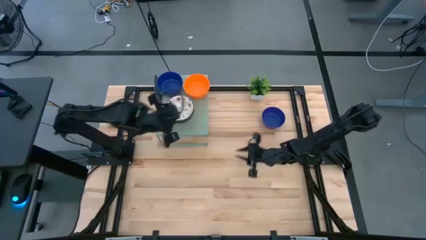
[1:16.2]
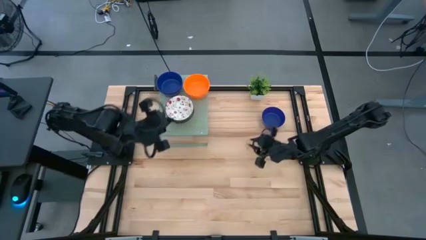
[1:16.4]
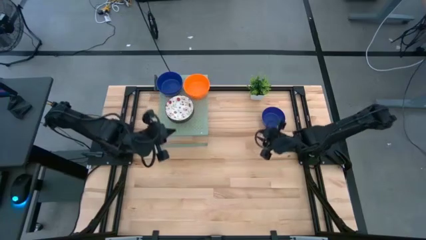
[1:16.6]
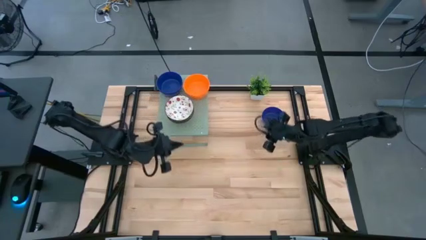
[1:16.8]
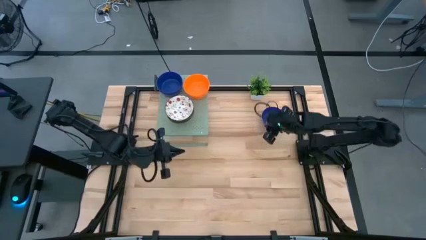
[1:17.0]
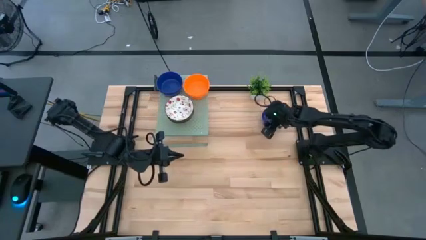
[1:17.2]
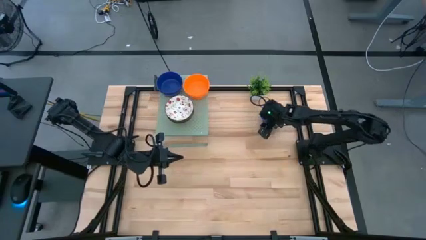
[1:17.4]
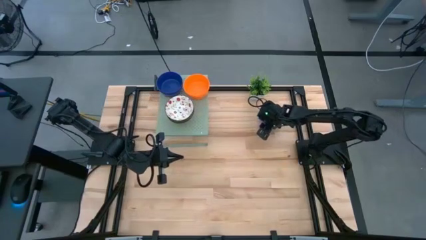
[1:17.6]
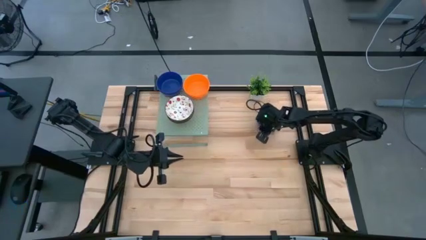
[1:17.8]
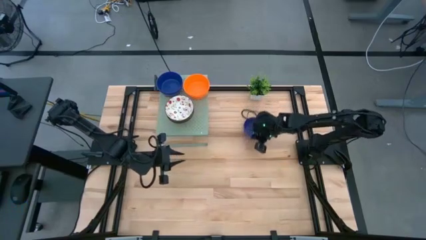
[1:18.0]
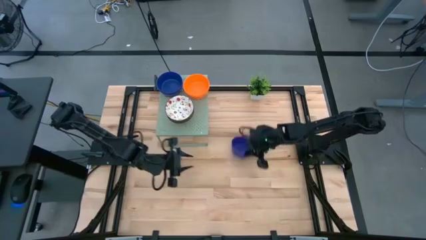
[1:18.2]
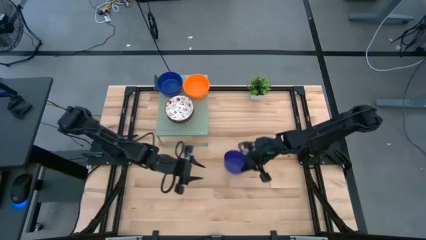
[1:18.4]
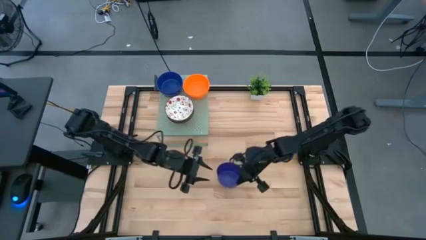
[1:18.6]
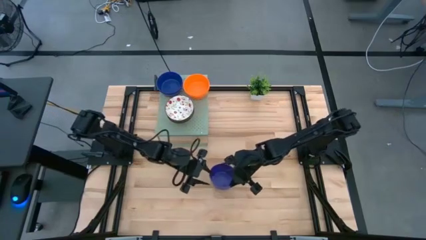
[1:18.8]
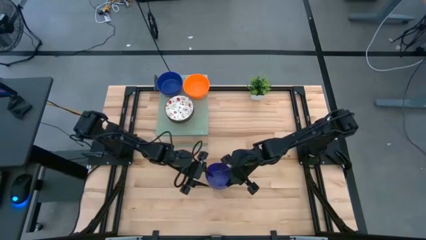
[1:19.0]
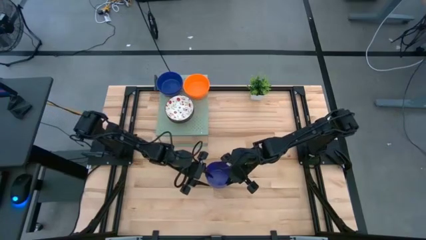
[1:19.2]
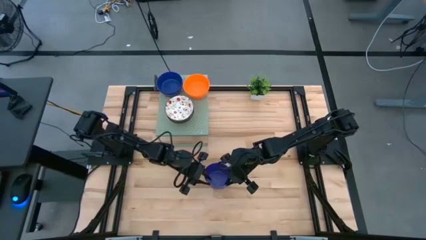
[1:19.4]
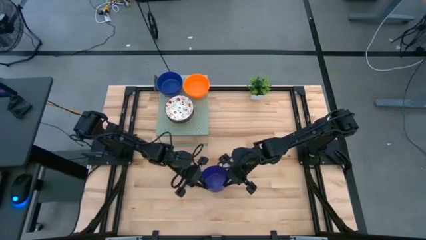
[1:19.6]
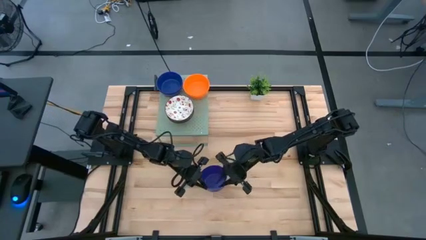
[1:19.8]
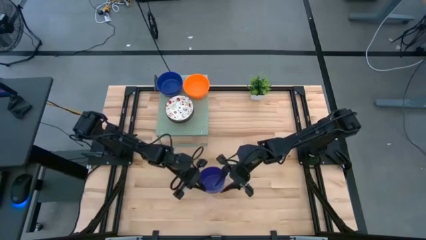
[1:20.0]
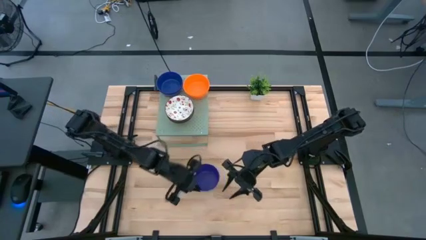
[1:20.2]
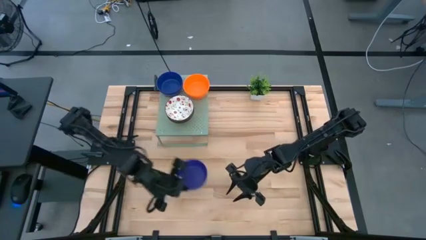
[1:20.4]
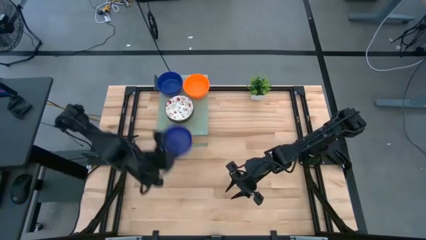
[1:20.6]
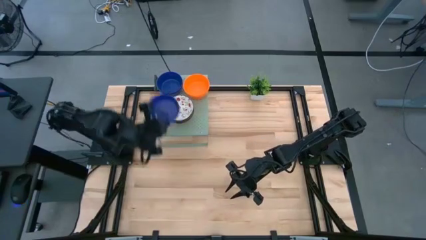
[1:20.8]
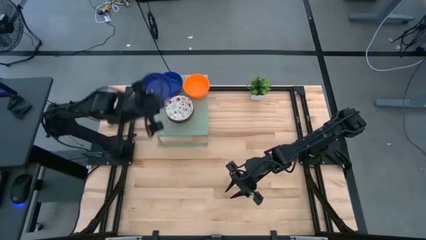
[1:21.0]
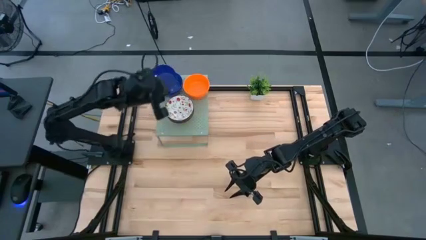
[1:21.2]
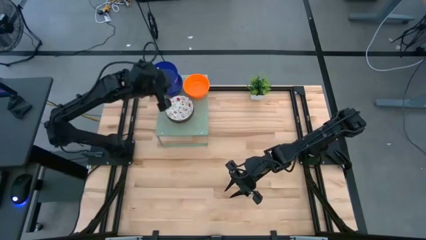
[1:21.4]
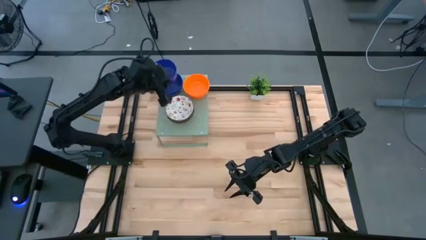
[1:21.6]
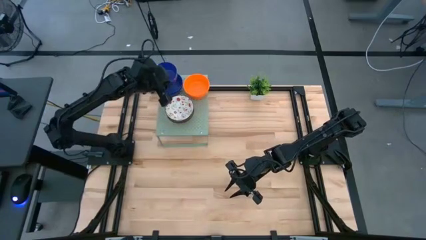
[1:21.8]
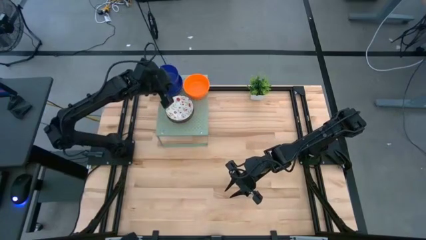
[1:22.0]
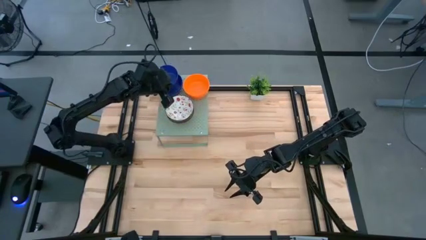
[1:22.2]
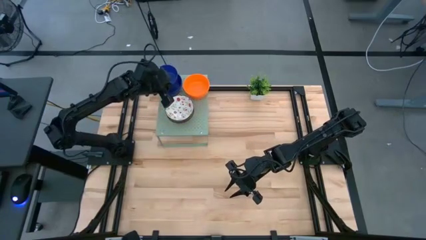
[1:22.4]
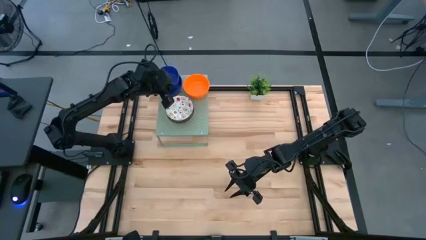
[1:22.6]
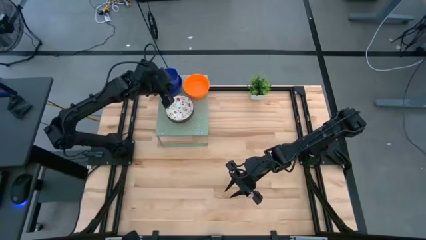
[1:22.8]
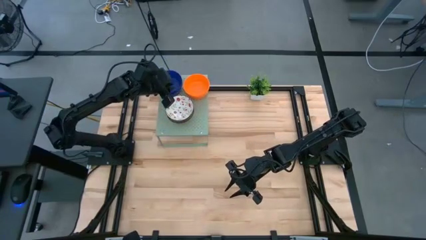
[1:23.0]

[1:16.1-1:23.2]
Task: Pick & Place Mini bowls
Stack the blue bowl on top of the stacked blue bowl on the shelf

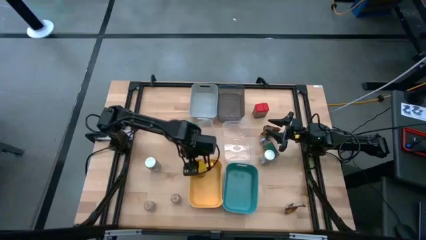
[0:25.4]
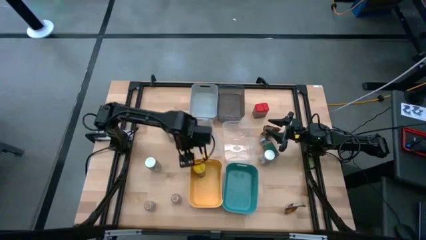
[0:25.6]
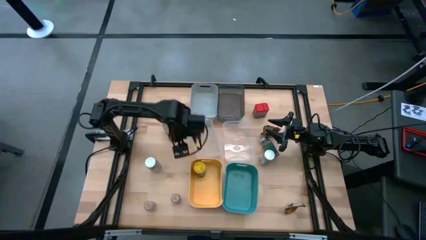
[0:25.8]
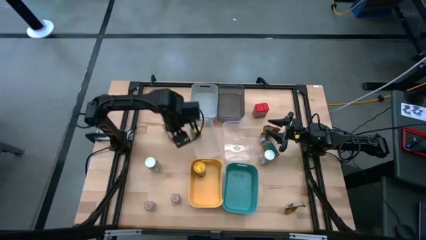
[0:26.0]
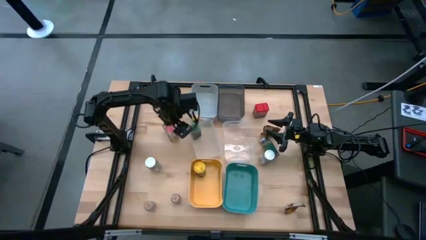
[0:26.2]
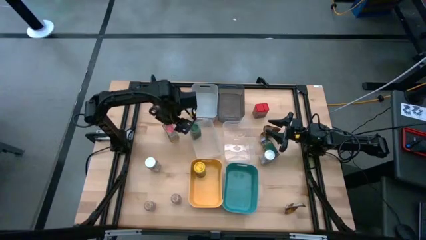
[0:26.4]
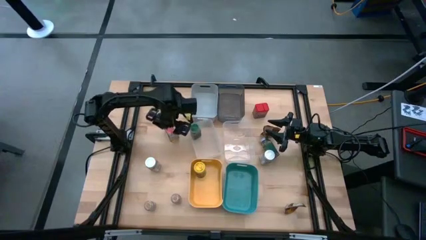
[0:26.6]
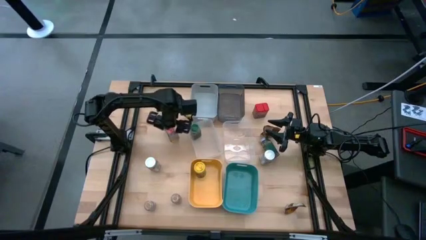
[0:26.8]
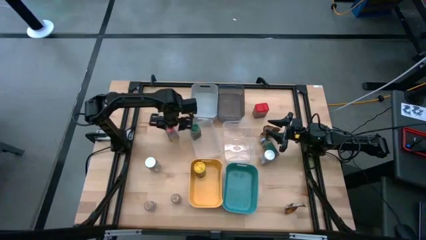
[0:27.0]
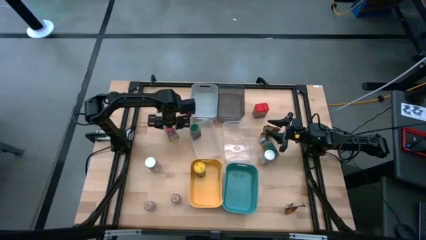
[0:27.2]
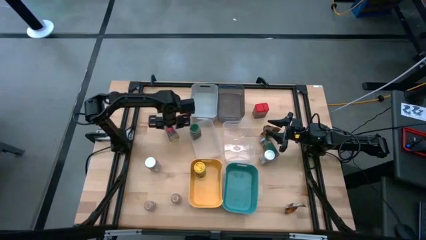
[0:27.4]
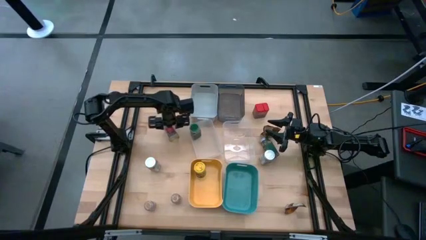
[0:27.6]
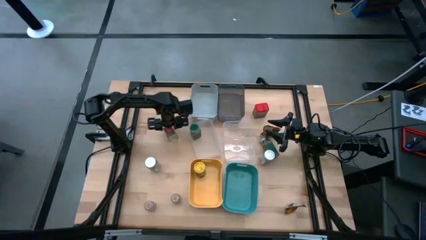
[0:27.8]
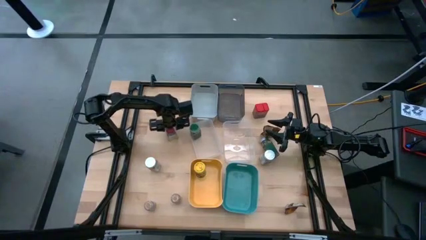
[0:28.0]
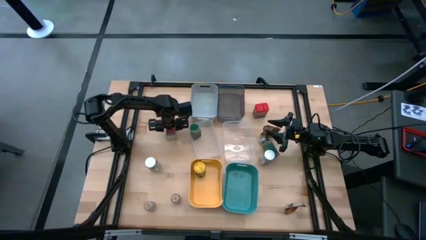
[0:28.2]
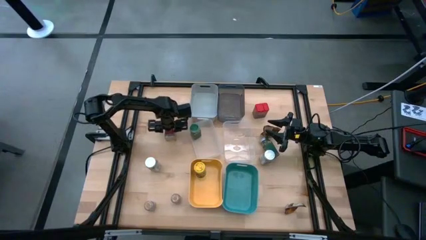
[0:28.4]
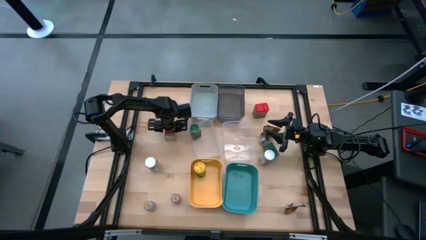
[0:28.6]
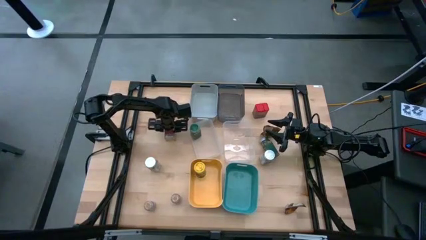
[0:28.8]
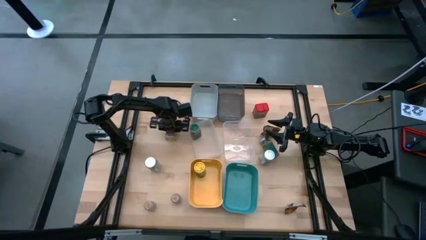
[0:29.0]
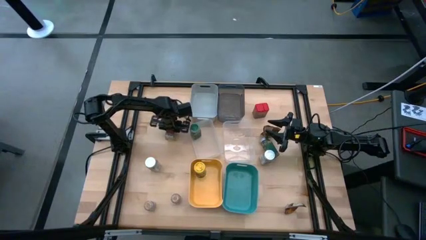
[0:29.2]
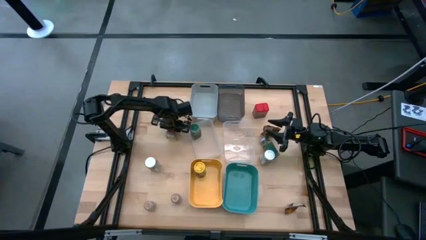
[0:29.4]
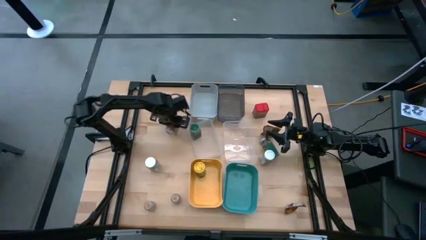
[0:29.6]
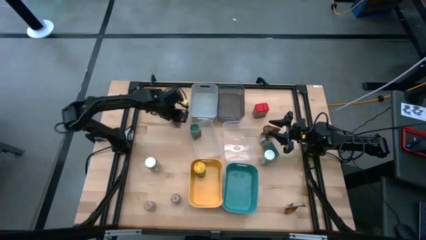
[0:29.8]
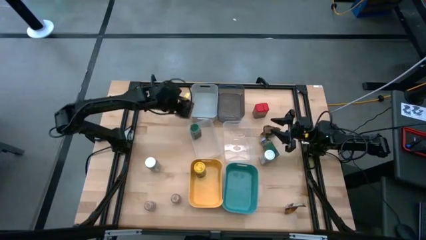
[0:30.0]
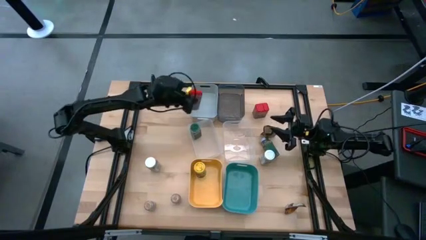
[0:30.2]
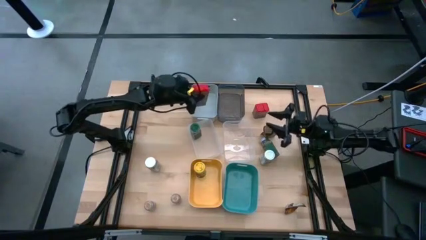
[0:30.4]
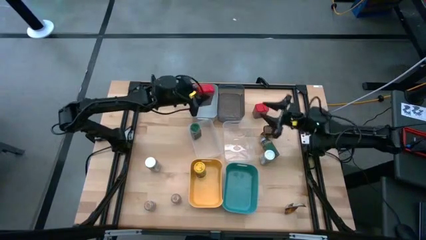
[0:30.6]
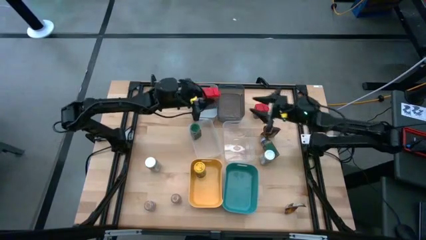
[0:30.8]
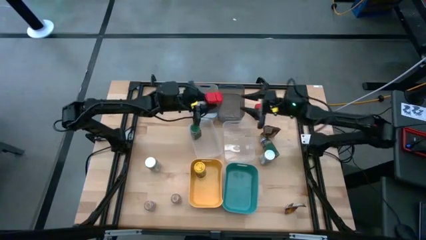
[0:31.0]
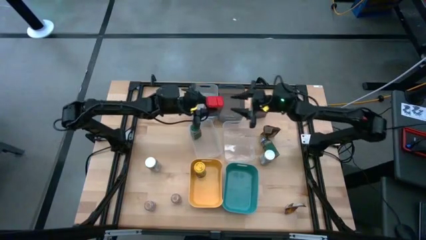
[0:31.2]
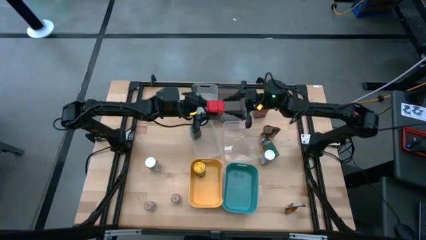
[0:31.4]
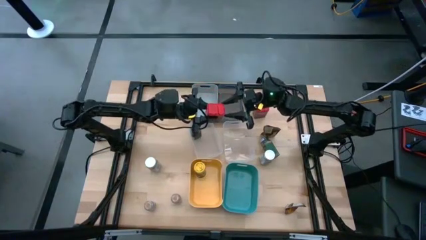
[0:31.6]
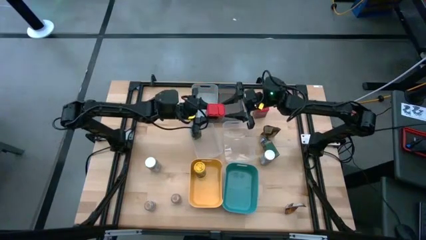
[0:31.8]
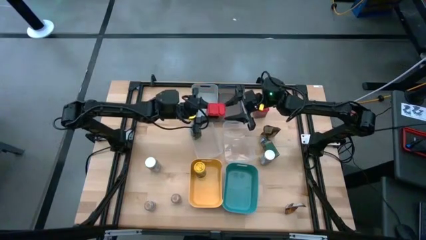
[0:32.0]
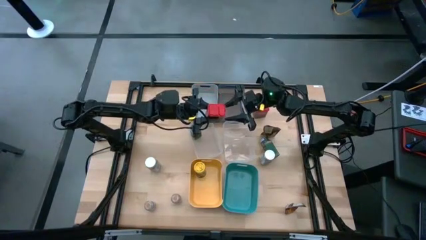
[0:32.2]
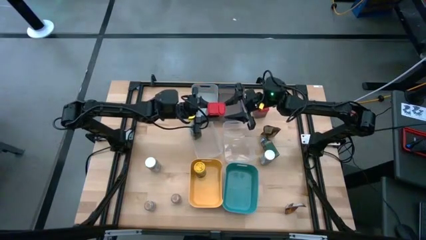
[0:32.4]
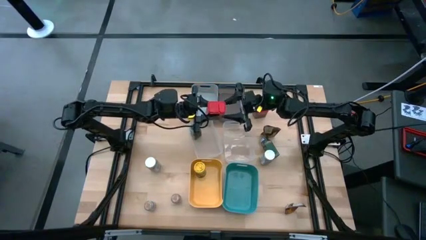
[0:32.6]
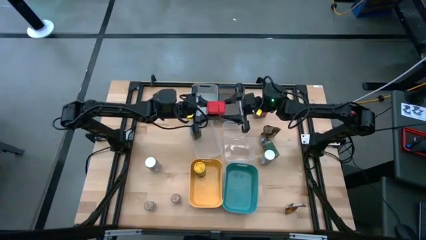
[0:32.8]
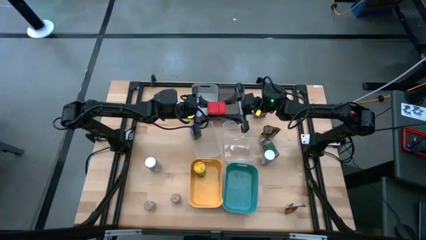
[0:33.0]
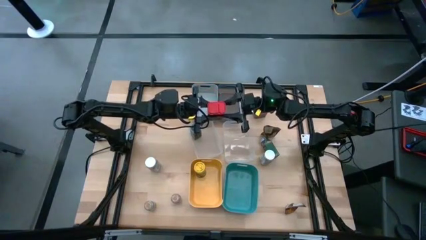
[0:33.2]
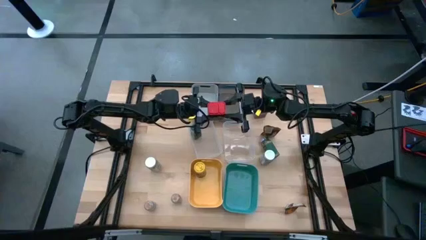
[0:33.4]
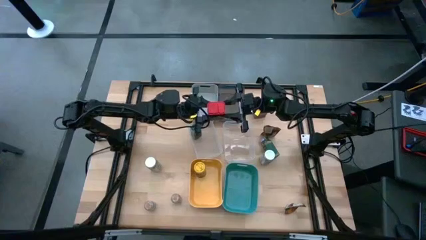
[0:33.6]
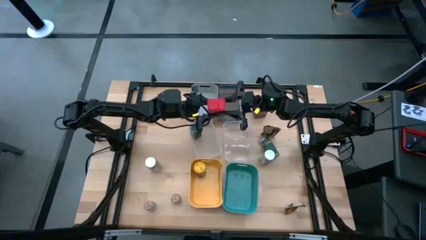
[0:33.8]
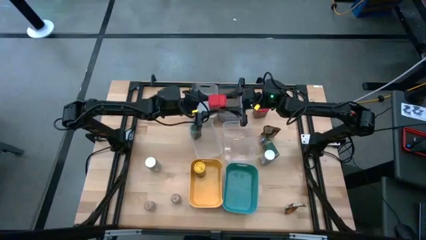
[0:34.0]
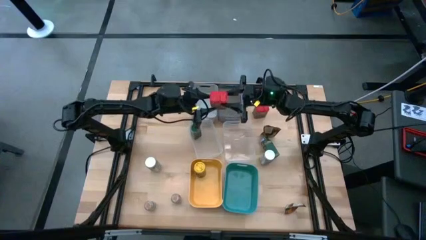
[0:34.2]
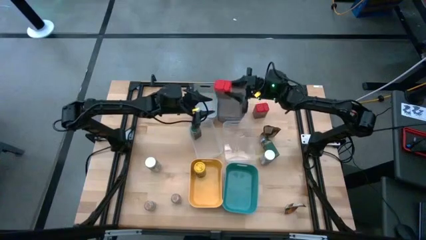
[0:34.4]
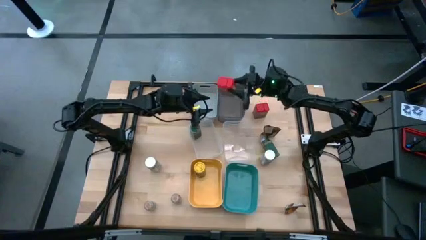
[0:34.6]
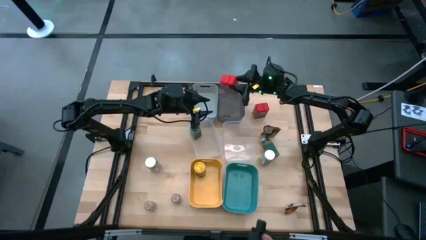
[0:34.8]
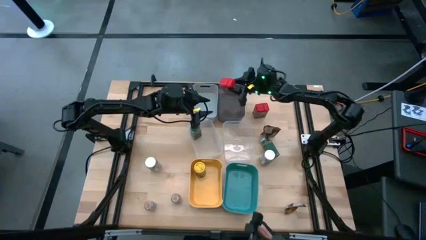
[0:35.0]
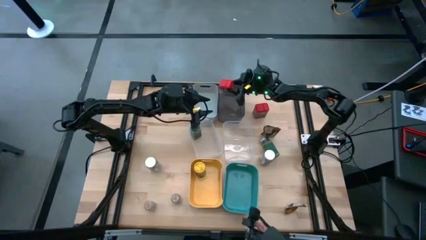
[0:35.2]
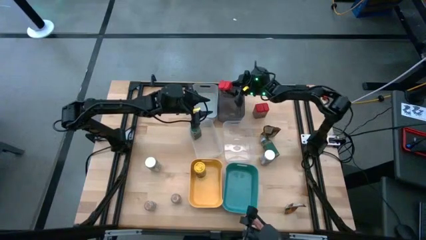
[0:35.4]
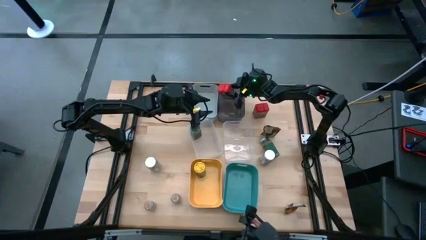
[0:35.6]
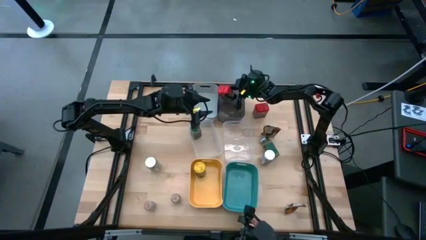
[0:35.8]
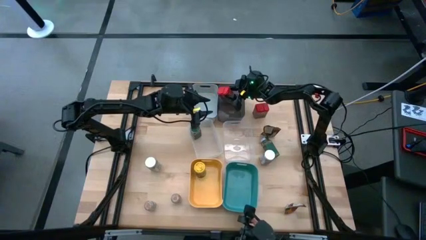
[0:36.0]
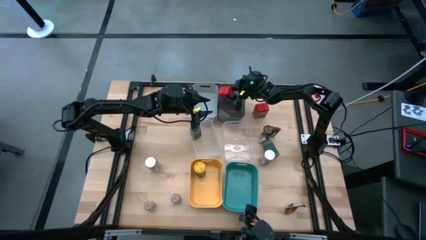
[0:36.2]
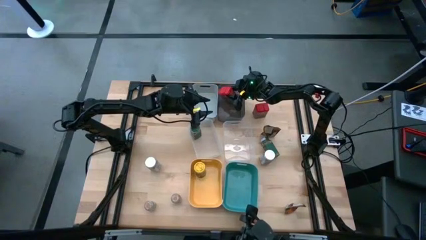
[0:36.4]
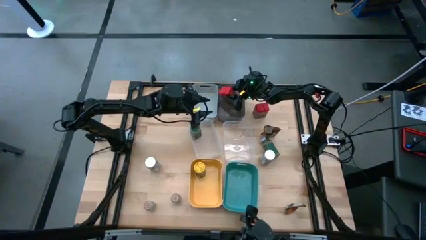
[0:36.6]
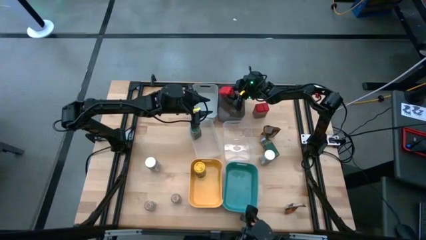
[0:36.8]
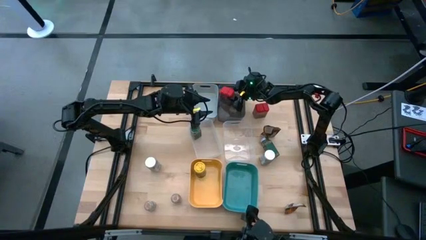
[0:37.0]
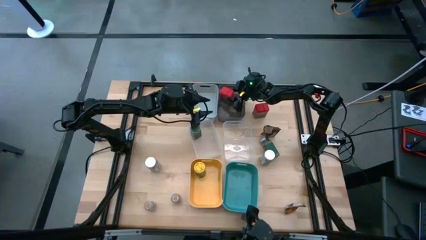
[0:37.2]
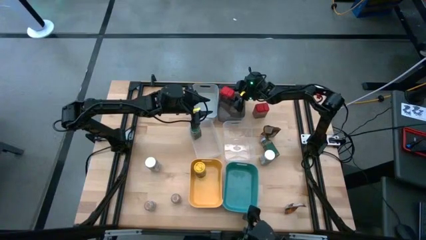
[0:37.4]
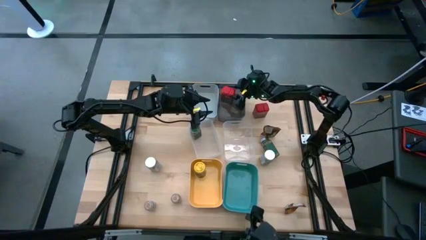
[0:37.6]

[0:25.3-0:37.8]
Task: Sort spices by type
Put the bottom red seasoning can into the black bin
